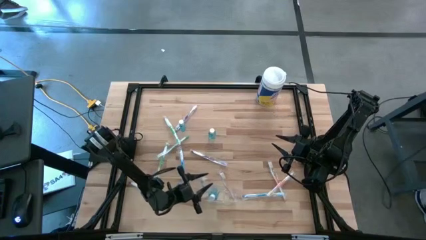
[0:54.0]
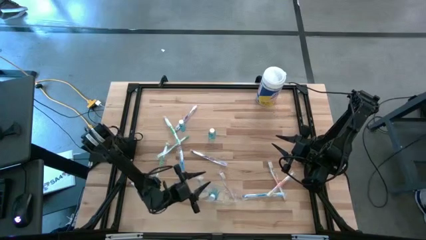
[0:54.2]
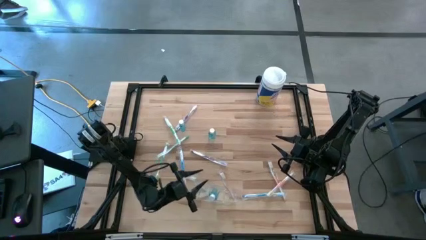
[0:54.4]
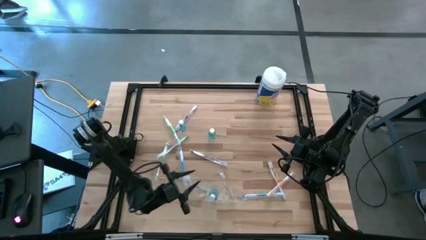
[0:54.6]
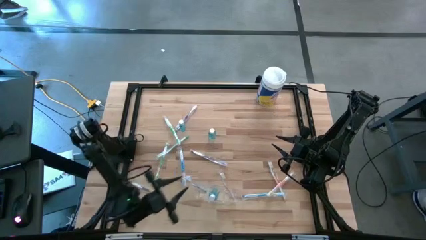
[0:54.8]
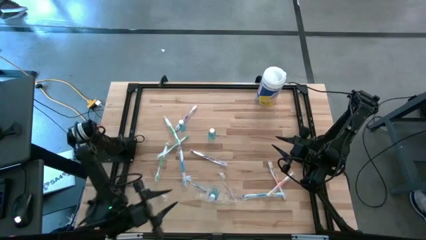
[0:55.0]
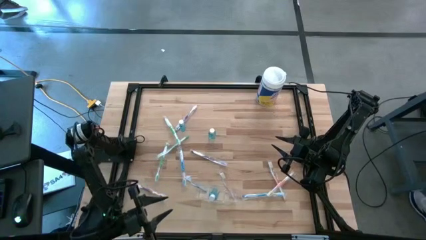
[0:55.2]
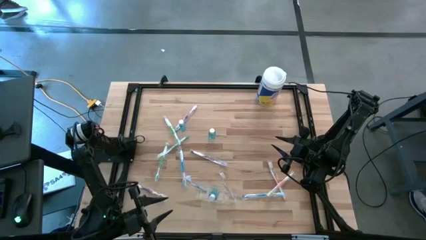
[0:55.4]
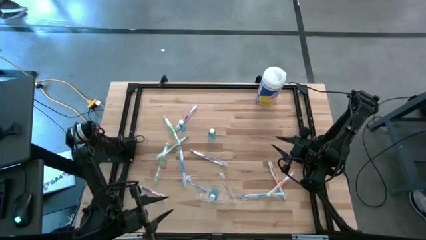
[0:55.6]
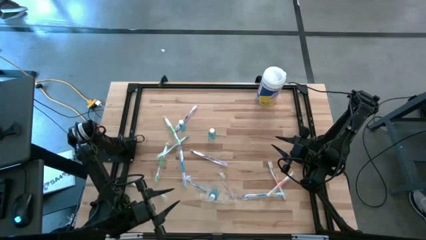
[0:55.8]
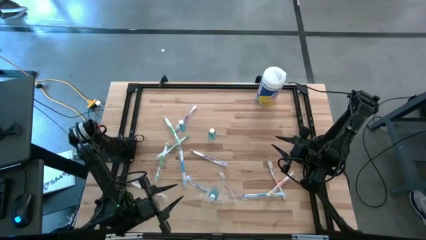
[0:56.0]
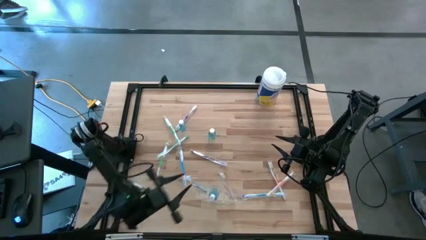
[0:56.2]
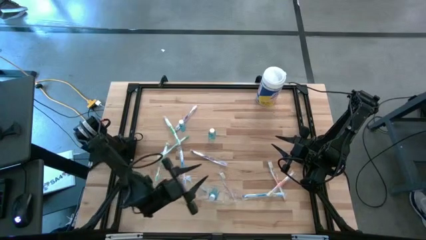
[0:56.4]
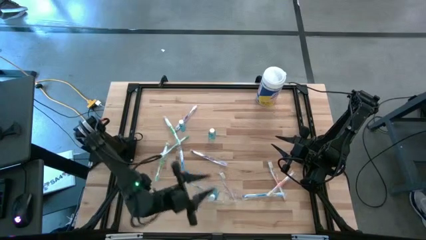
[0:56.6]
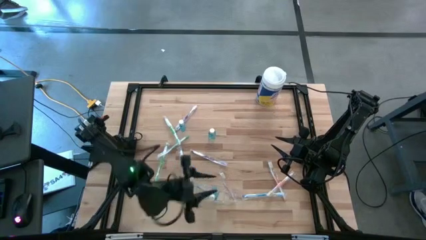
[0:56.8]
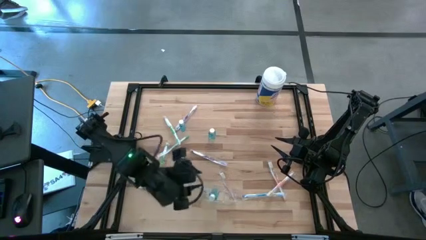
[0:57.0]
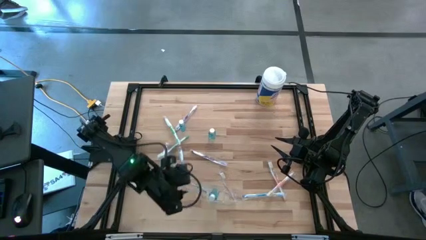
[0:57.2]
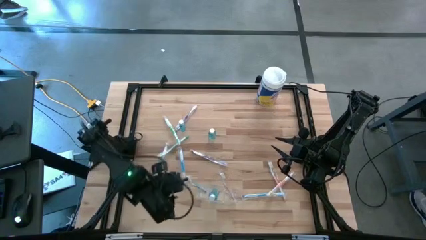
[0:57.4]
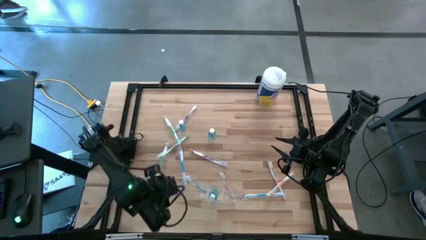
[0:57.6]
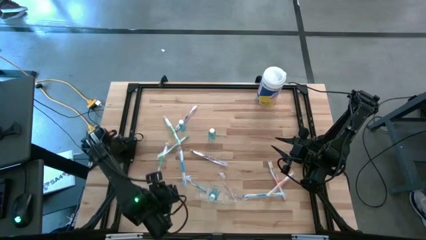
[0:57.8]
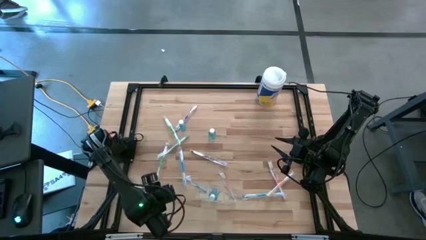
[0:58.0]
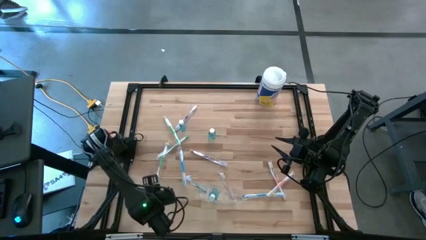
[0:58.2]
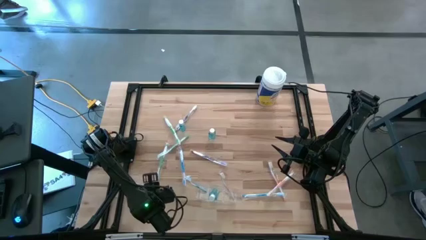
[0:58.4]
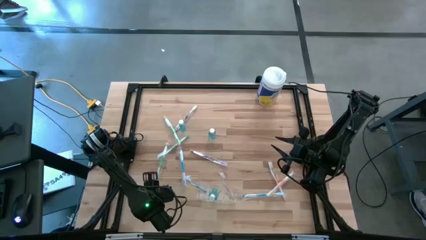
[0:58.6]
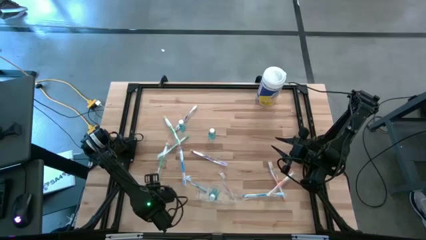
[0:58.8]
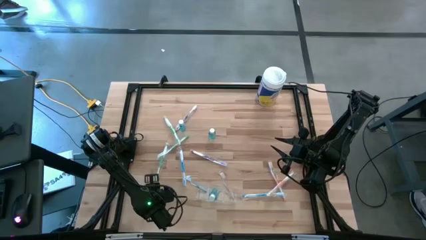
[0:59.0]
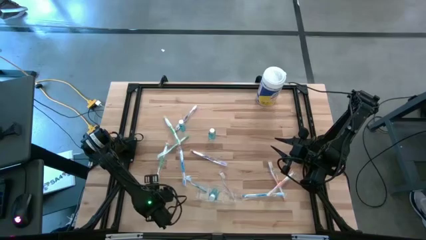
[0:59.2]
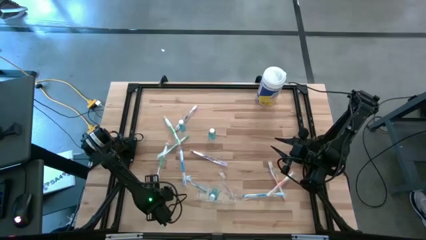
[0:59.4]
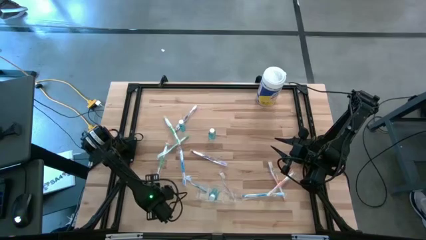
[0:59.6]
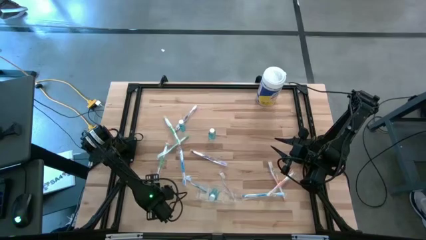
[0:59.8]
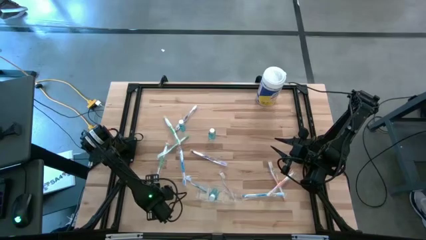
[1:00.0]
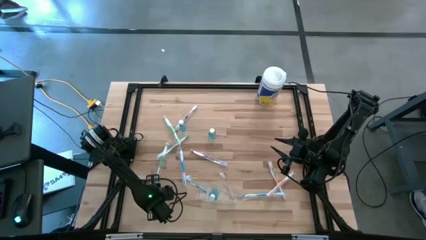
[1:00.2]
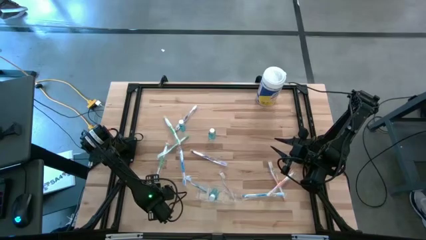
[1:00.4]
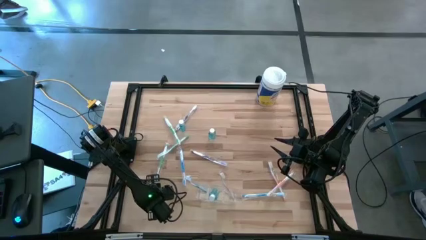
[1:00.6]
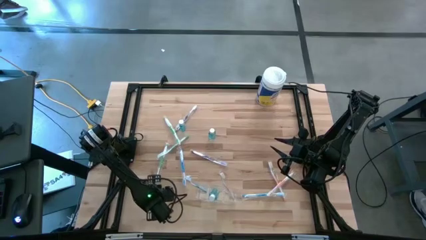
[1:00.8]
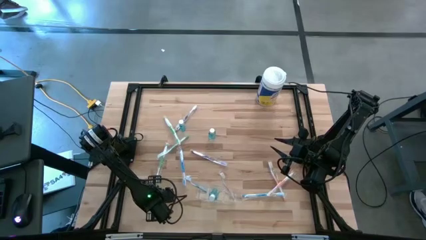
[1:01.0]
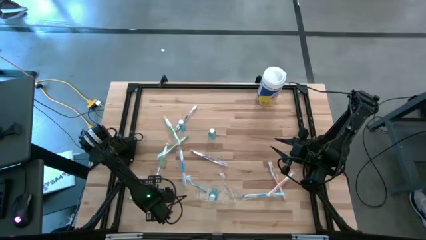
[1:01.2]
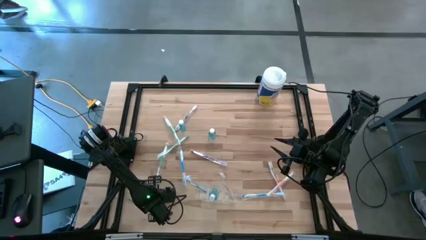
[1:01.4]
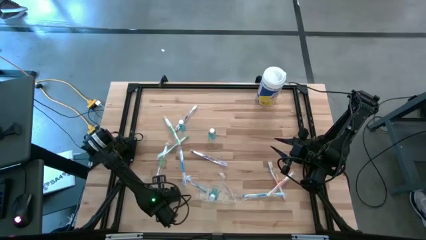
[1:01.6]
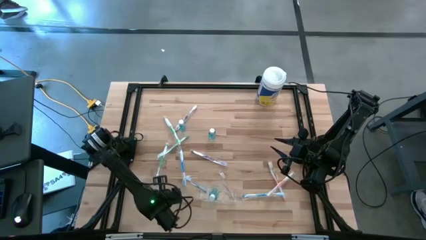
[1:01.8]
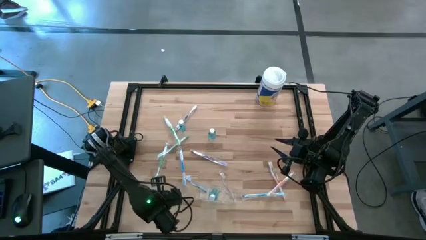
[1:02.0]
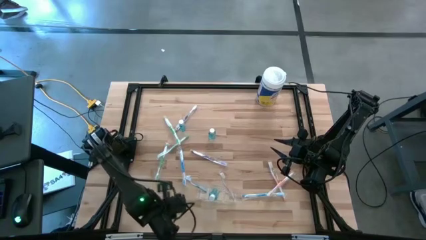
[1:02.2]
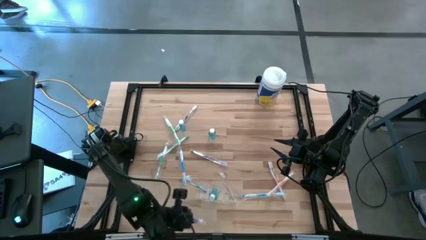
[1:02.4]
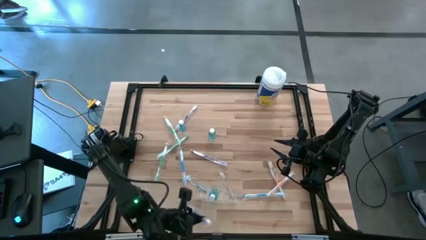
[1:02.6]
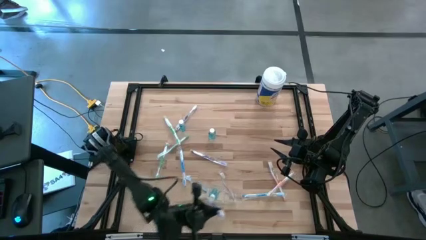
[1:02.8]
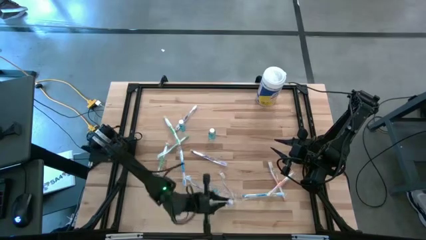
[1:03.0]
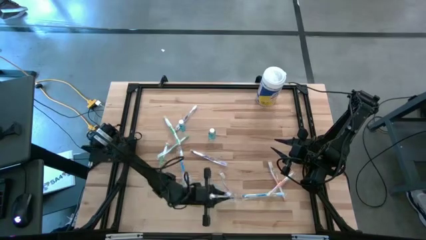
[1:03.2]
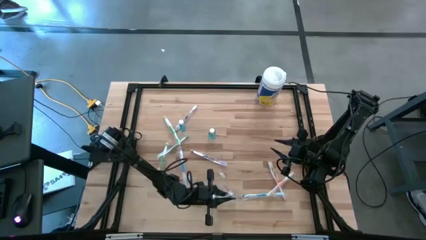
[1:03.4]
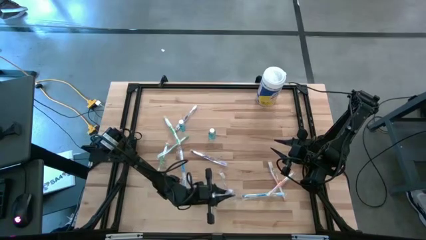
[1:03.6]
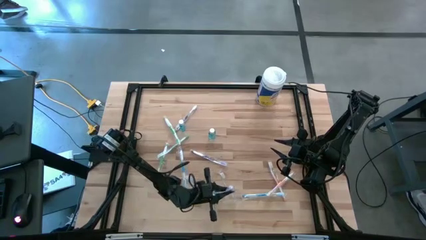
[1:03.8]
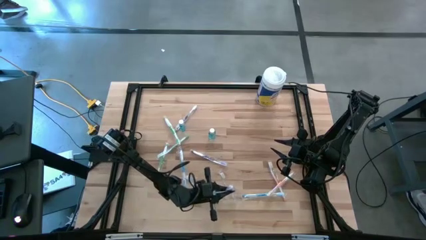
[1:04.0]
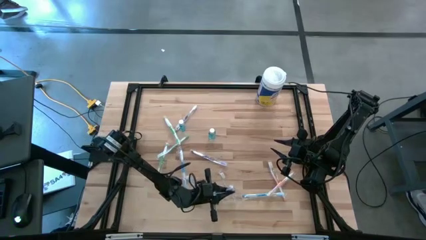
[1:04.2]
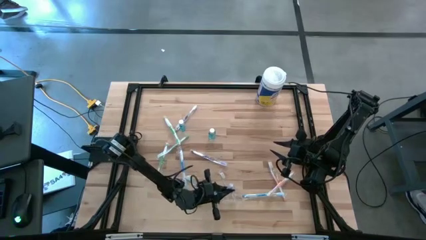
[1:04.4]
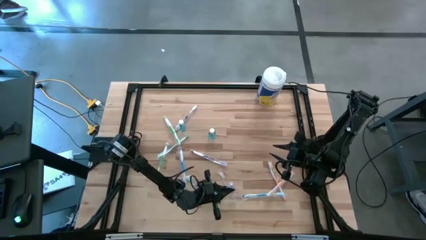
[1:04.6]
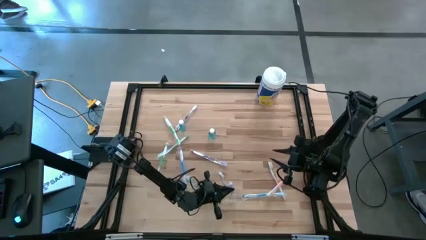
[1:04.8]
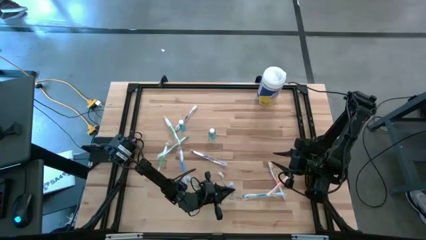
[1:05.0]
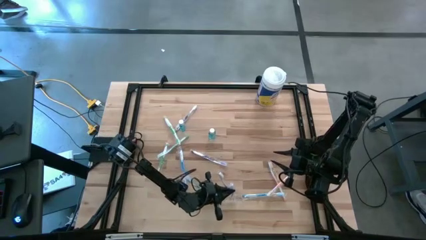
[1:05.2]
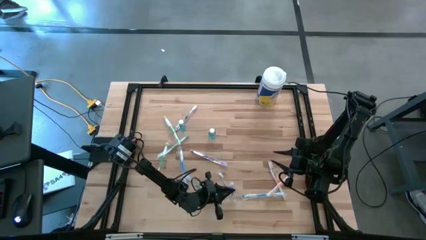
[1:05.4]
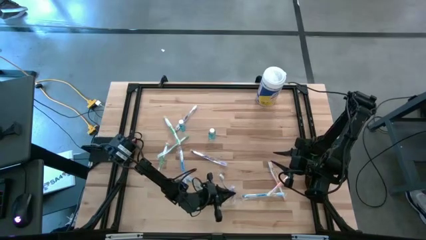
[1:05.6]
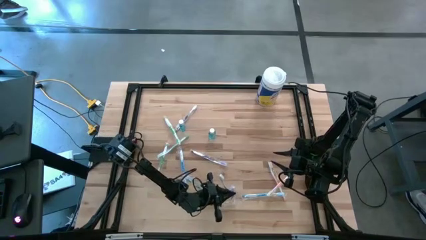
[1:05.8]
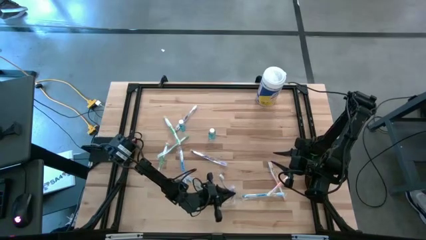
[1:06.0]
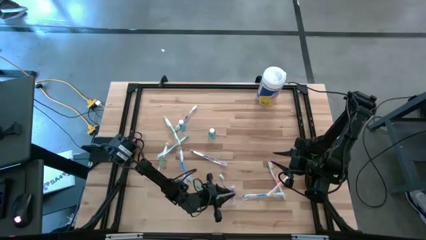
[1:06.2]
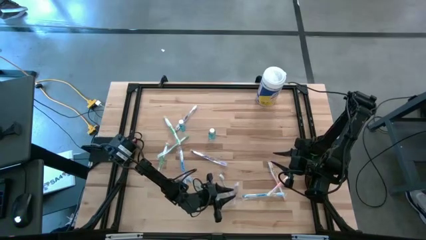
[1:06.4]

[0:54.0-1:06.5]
Task: Pick & Place toothbrushing station
Put the purple toothbrush into the transparent organizer

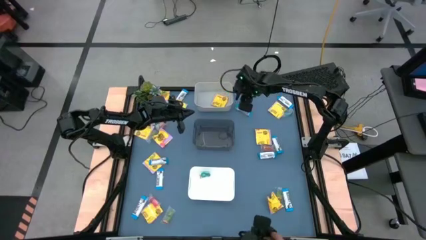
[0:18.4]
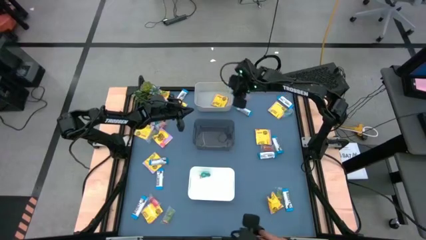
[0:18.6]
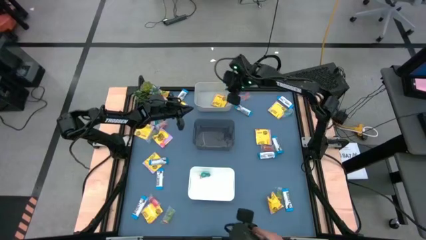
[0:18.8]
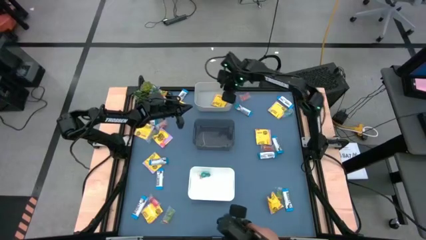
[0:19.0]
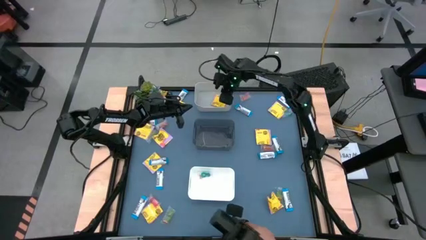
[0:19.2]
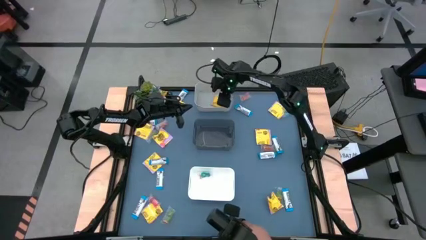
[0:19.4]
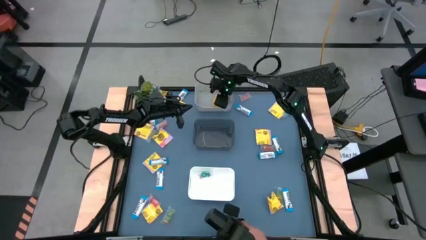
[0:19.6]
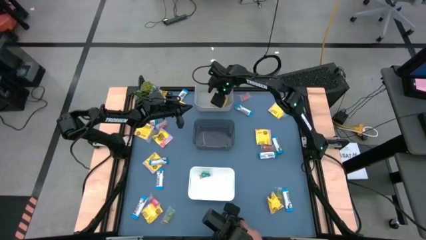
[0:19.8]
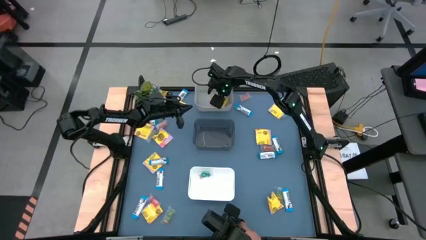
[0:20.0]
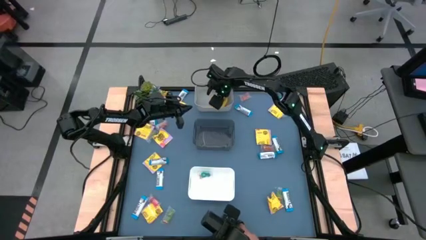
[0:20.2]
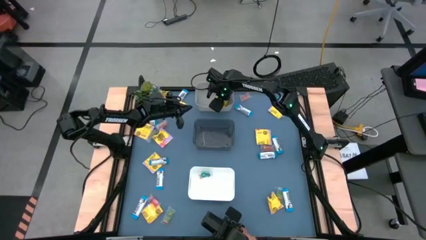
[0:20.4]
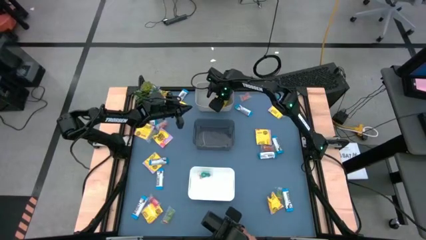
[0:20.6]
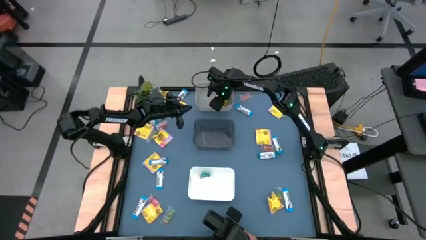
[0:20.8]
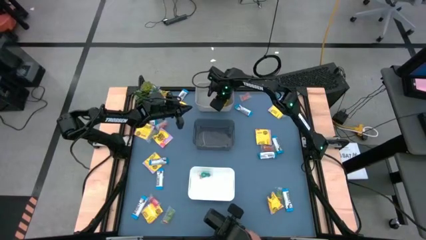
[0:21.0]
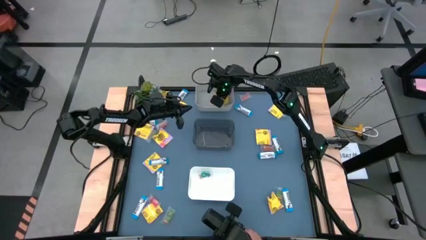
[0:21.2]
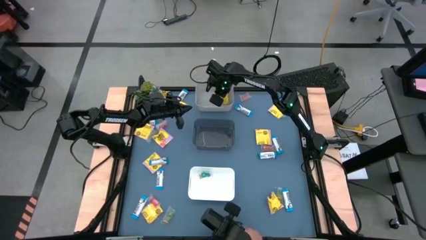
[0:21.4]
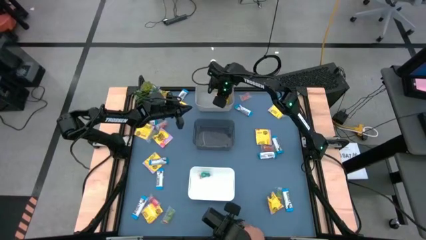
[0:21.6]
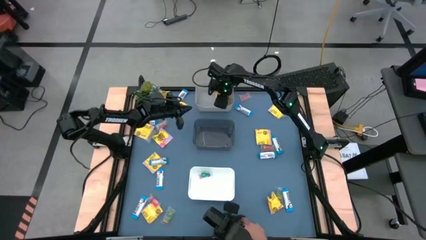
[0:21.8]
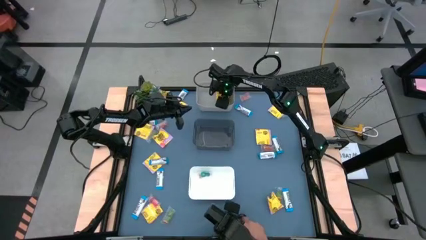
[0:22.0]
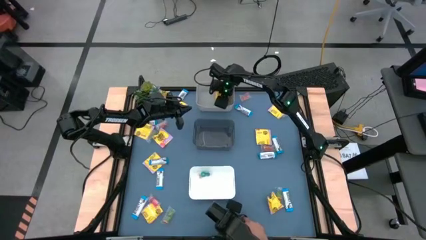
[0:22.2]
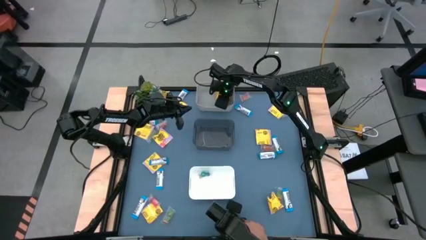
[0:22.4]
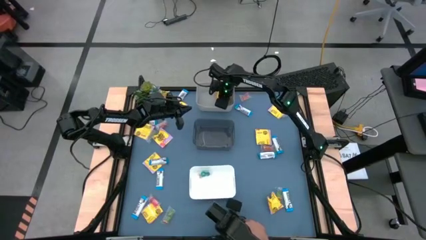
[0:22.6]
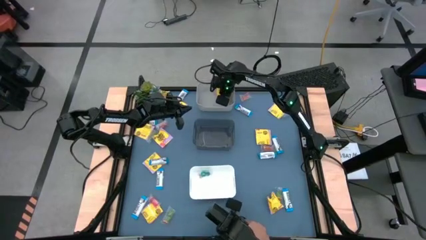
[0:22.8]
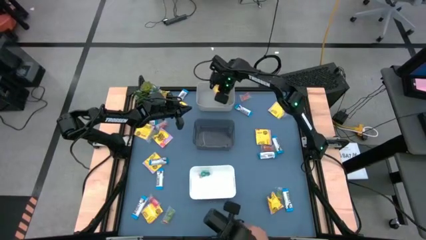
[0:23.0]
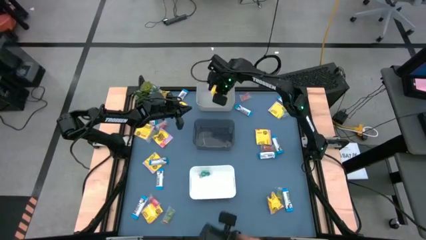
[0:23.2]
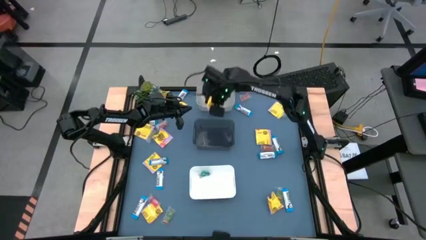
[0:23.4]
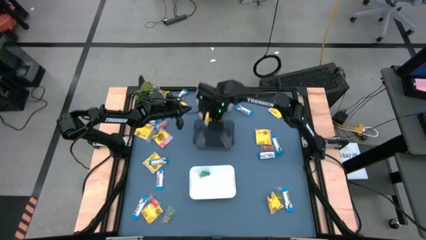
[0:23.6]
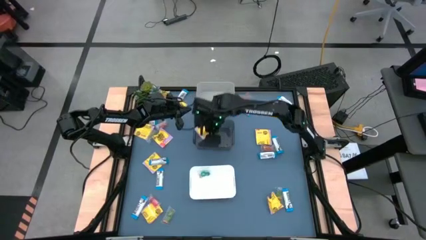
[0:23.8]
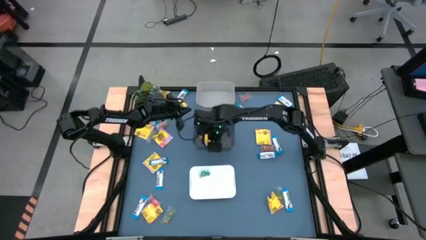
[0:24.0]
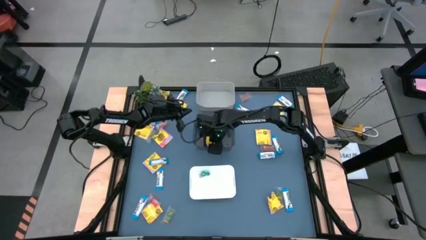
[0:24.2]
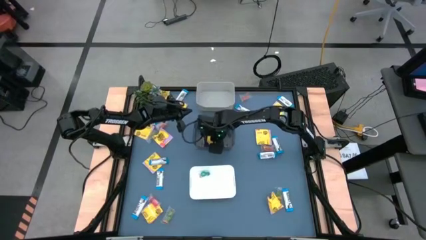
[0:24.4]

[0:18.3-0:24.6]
Task: Sort candy
Put the yellow candy into the black bin
